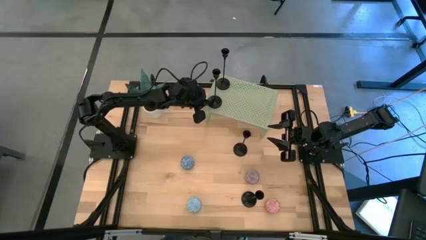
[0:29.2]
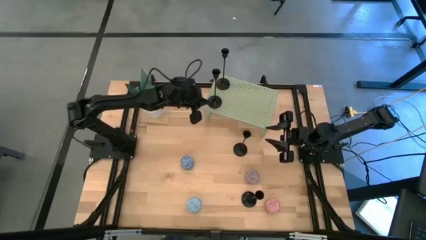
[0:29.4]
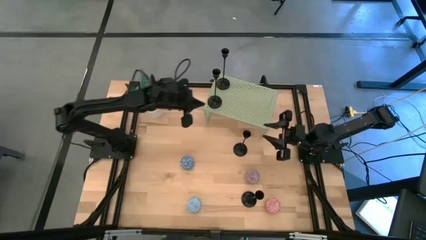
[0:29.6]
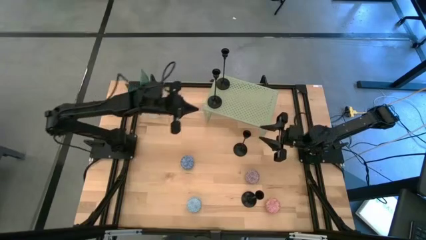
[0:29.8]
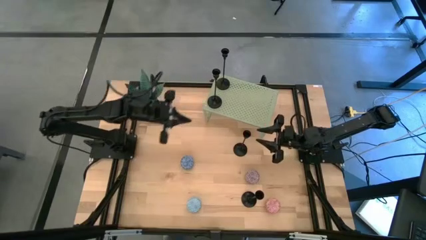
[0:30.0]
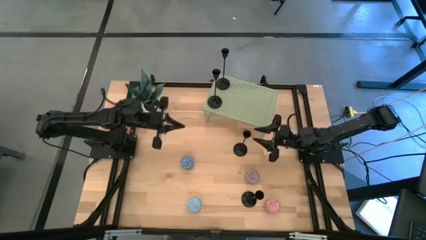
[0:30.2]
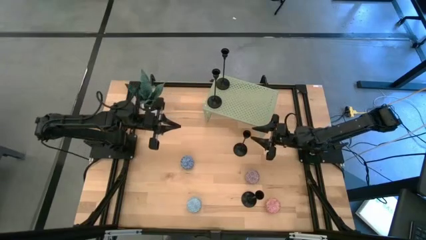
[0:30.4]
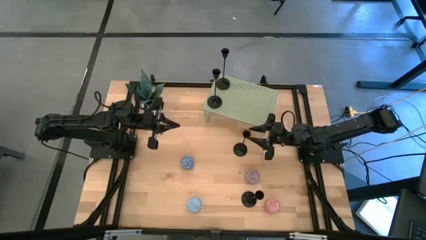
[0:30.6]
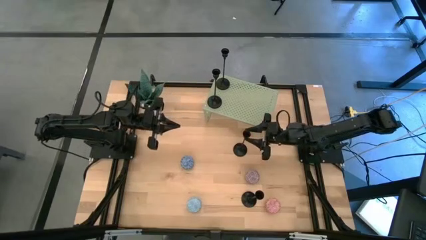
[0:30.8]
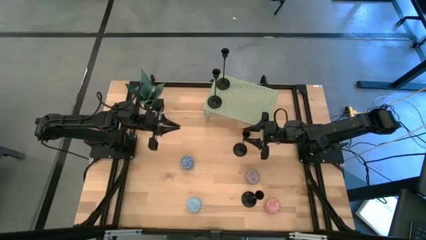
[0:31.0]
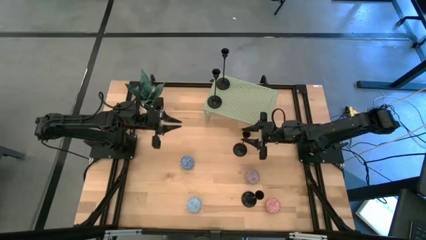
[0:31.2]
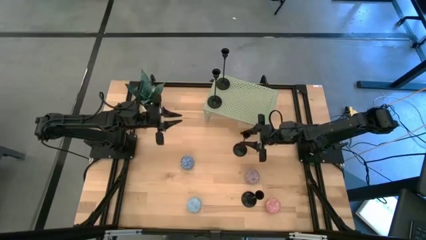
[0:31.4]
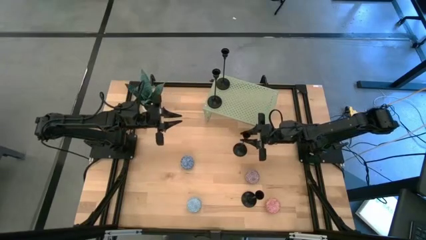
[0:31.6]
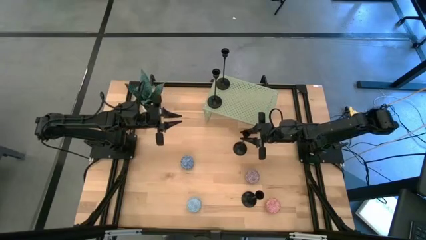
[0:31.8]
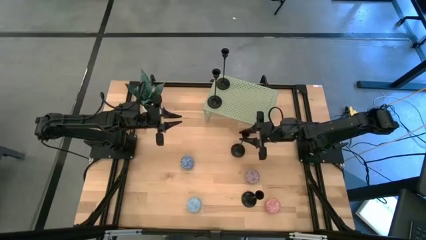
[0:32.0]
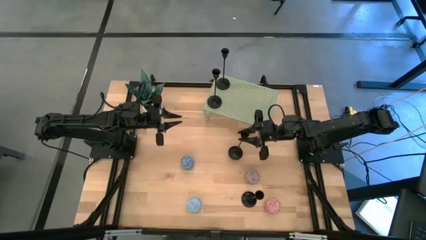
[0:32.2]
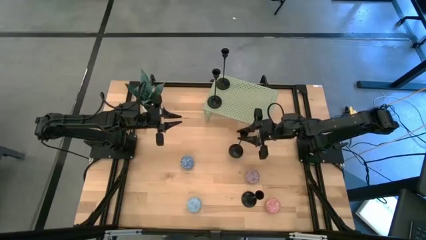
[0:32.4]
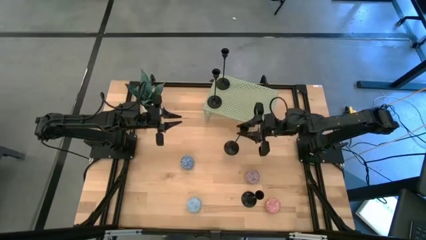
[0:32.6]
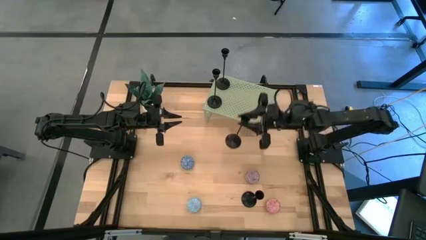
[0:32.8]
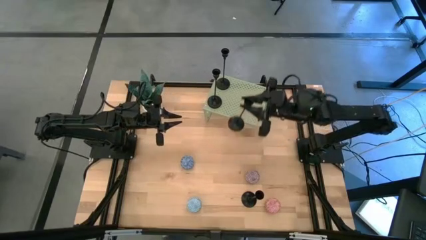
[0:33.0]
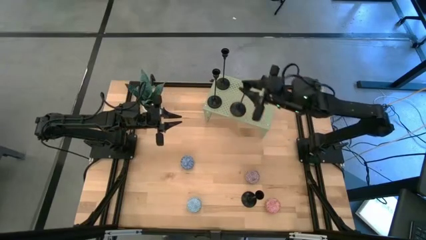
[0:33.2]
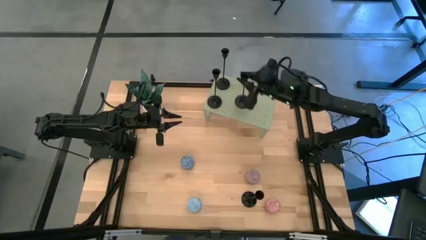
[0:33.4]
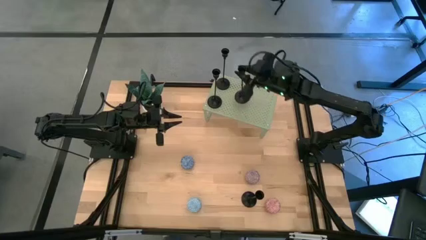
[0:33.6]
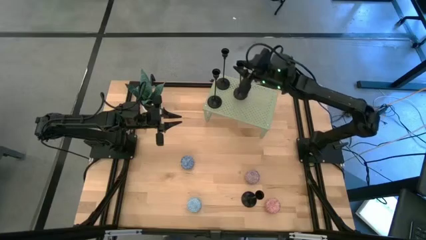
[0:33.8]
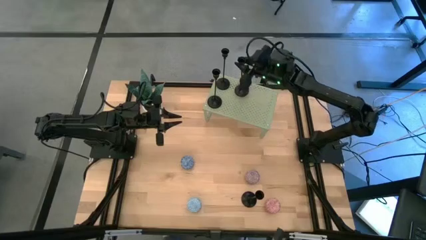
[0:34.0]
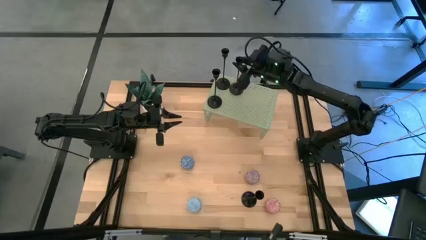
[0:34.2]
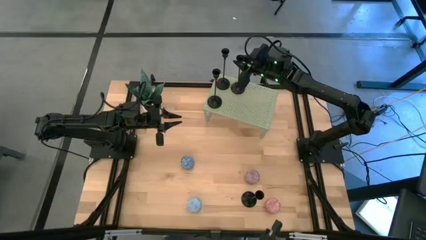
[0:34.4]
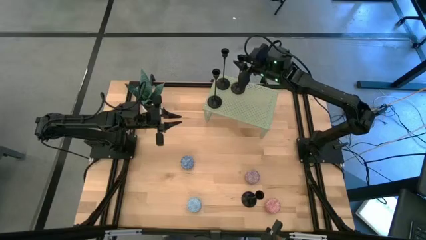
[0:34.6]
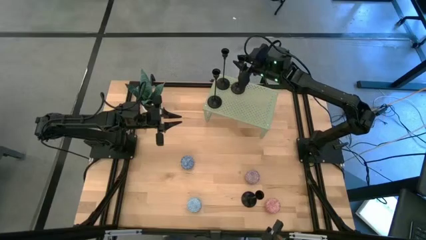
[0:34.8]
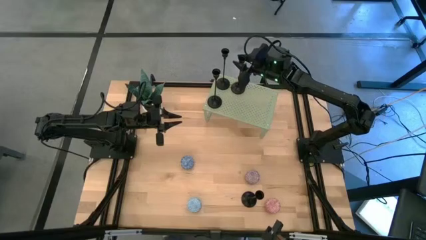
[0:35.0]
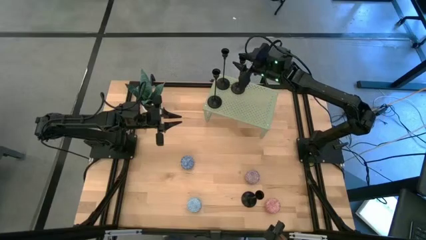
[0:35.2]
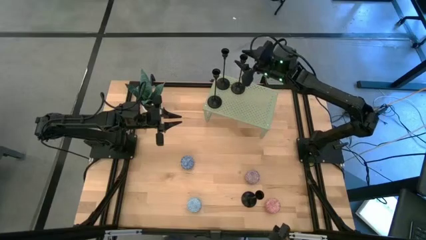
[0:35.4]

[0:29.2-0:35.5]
Task: Pick & Place candle stick holders
Put the black candle holder on the shelf

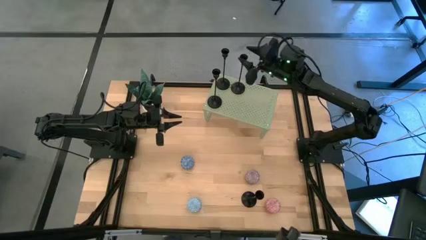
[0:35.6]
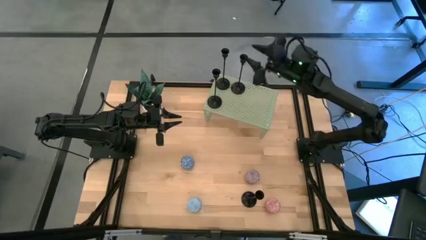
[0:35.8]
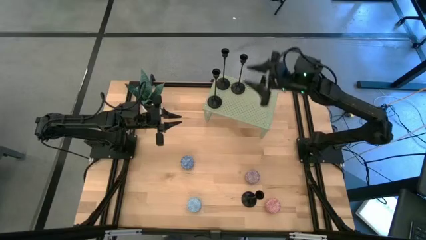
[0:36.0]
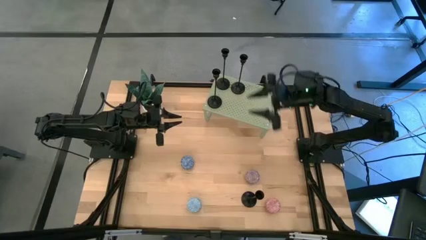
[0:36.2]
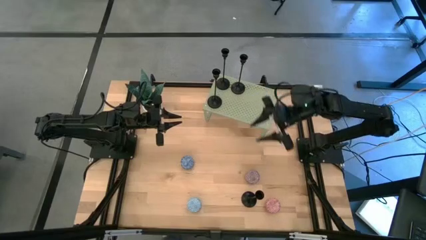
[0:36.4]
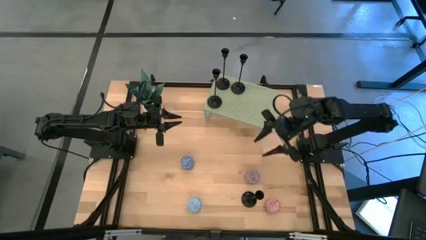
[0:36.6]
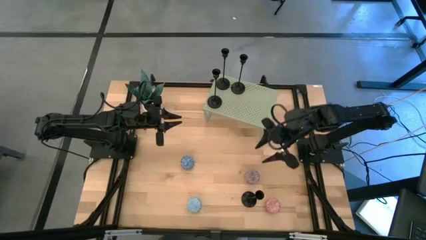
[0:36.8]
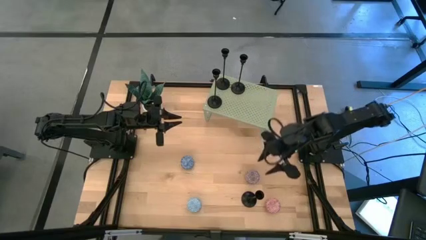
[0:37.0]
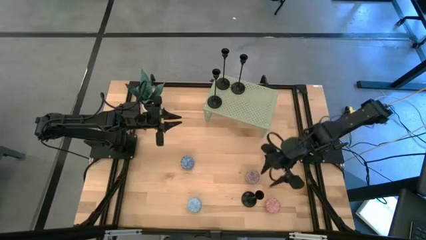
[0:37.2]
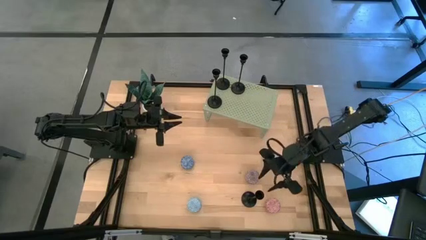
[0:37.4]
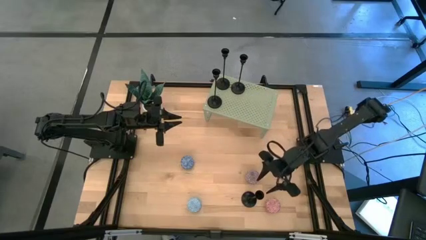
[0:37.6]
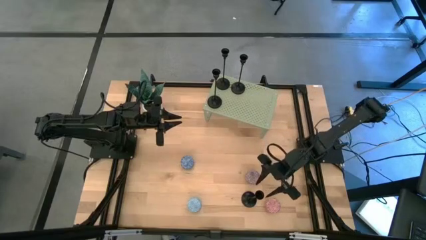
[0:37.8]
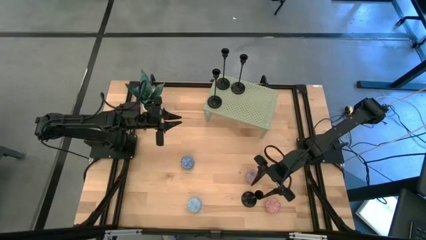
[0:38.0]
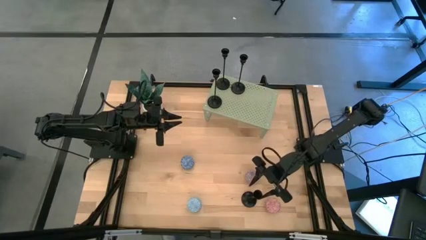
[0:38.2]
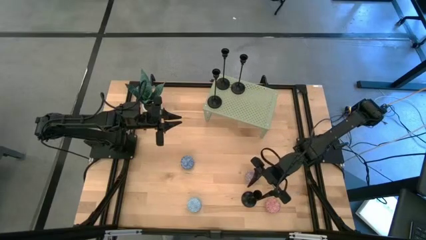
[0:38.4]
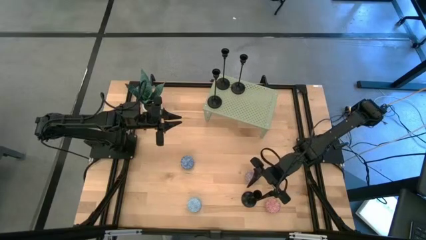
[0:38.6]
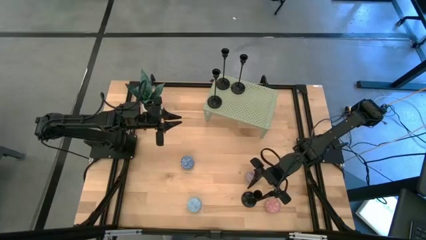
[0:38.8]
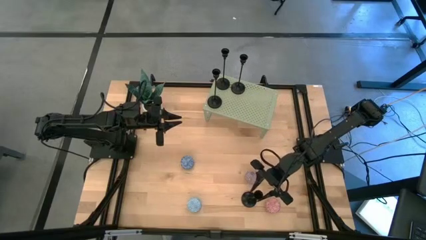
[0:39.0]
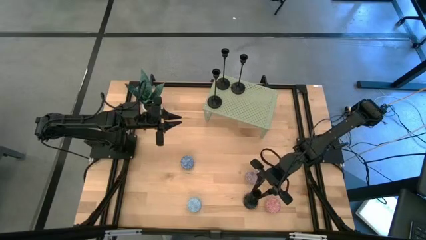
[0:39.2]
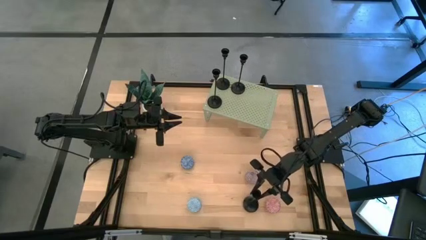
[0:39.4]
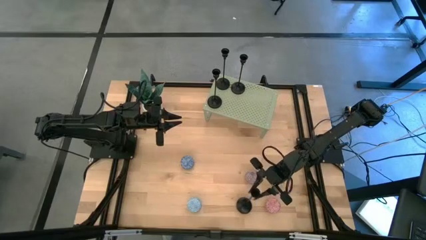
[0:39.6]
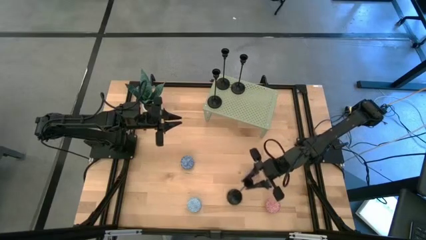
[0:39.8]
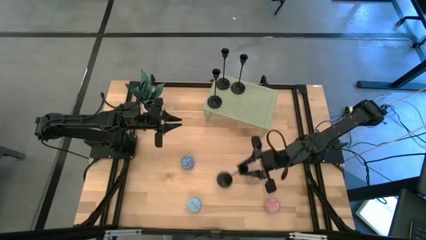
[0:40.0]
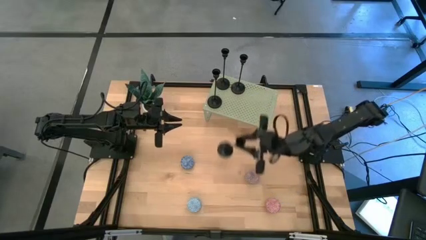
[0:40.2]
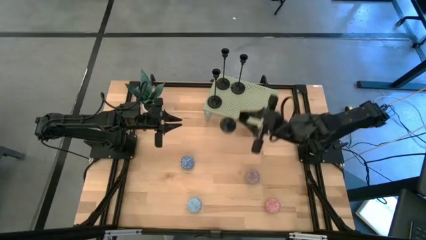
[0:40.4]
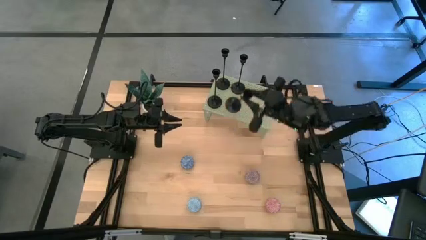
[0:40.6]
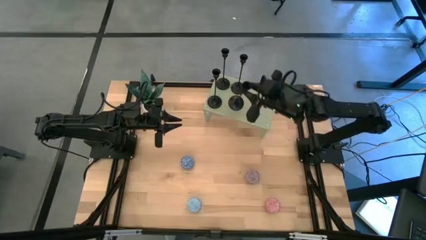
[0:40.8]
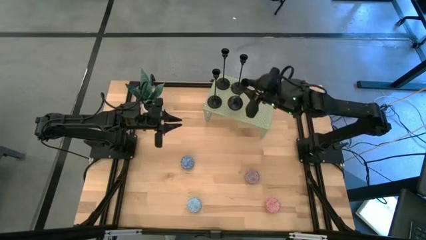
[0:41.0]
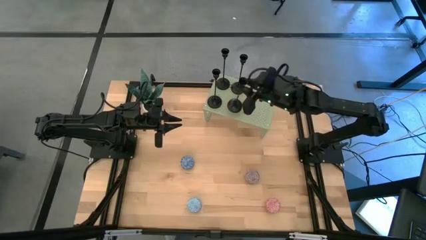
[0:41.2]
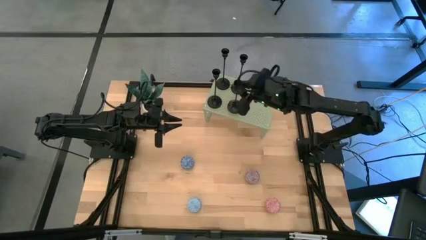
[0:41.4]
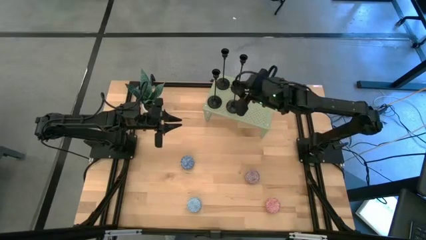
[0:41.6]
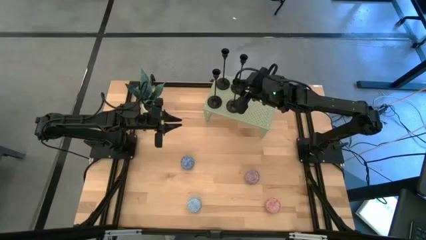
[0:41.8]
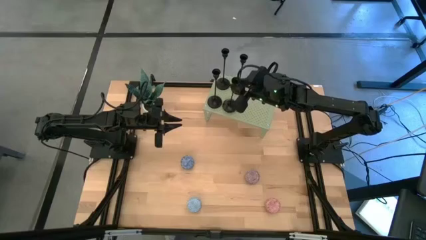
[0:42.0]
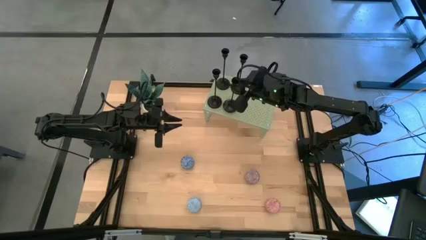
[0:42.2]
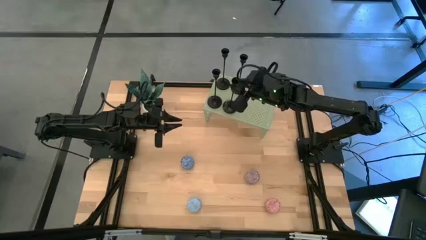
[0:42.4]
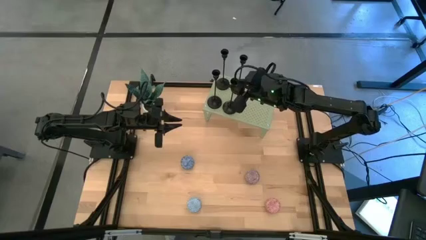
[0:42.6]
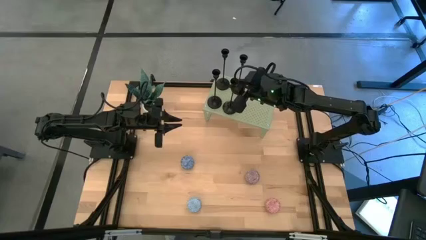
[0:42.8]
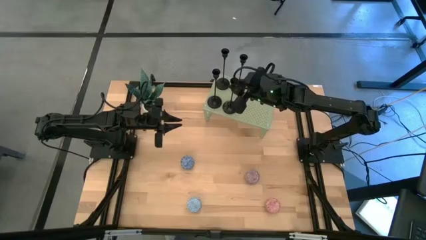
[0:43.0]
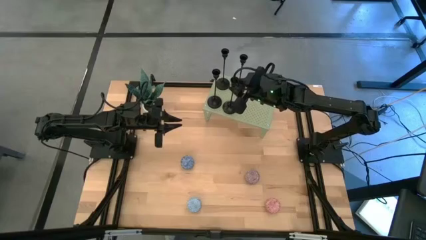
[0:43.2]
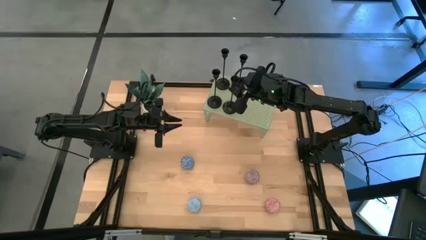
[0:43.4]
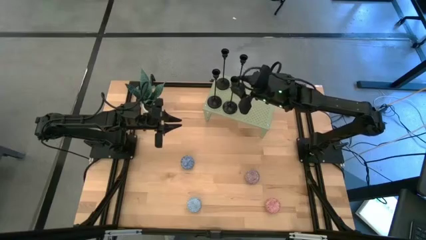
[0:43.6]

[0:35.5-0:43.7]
Put the black candle holder on the shelf
